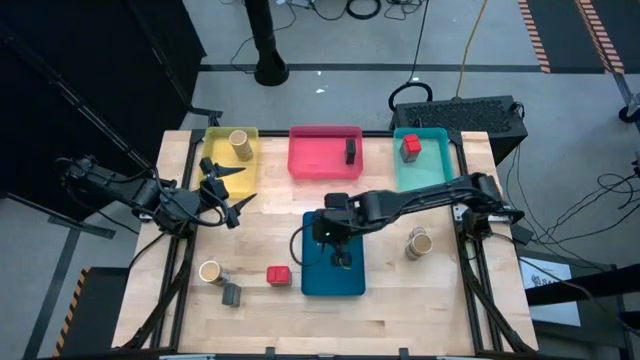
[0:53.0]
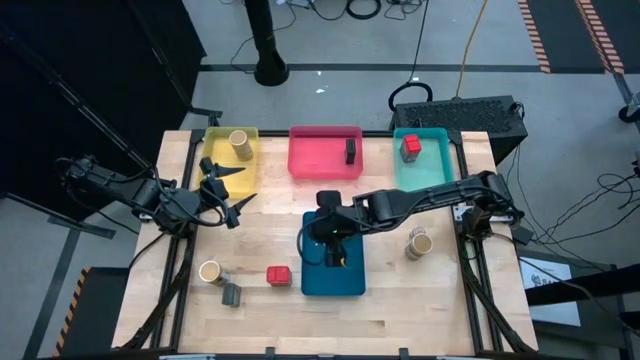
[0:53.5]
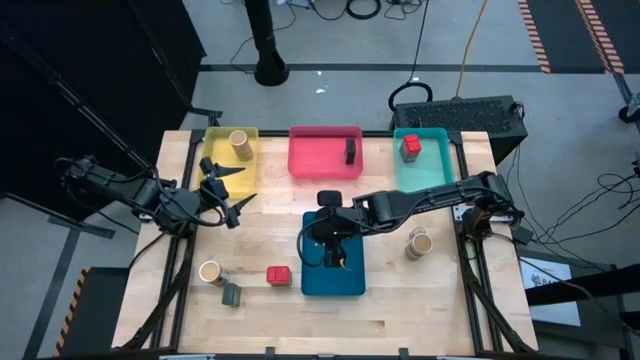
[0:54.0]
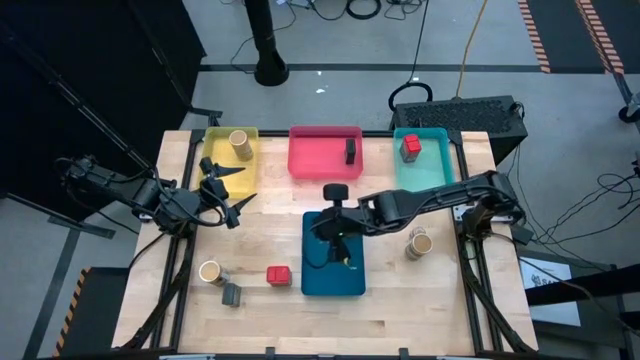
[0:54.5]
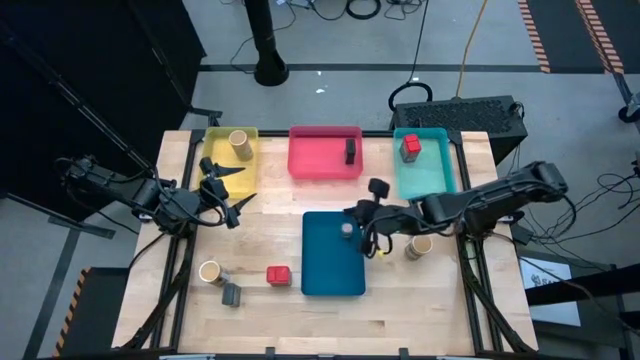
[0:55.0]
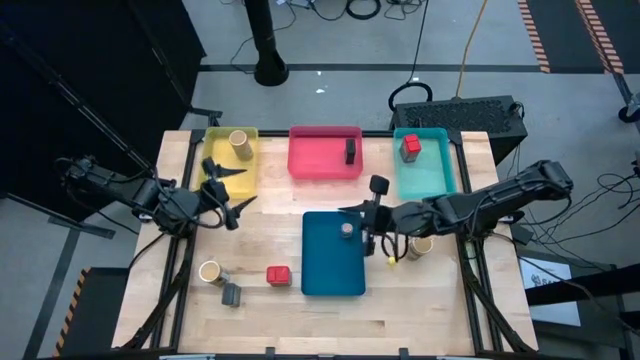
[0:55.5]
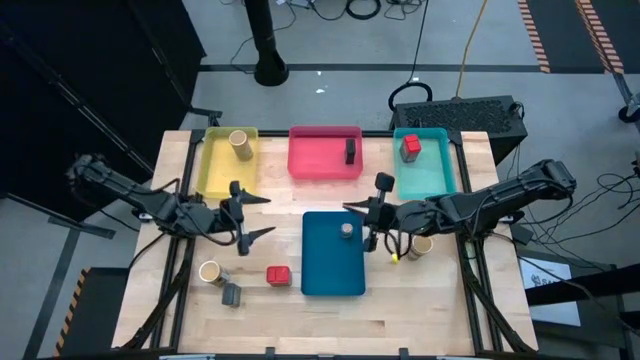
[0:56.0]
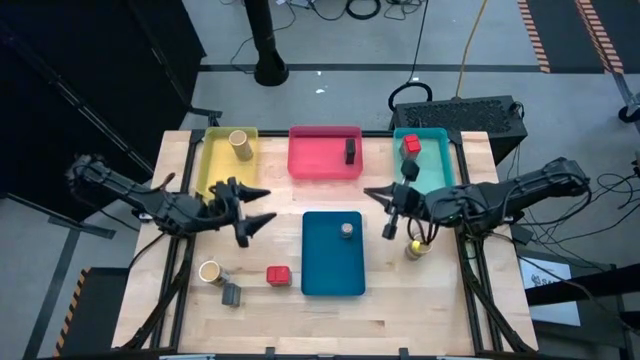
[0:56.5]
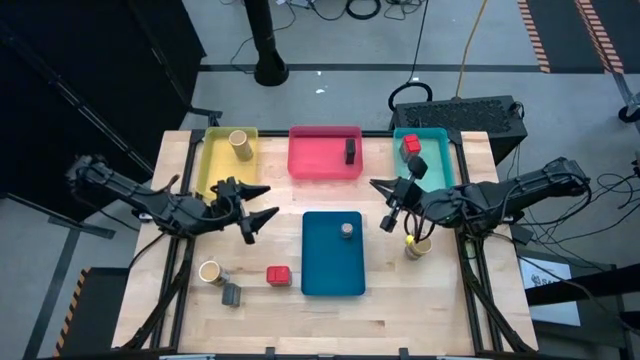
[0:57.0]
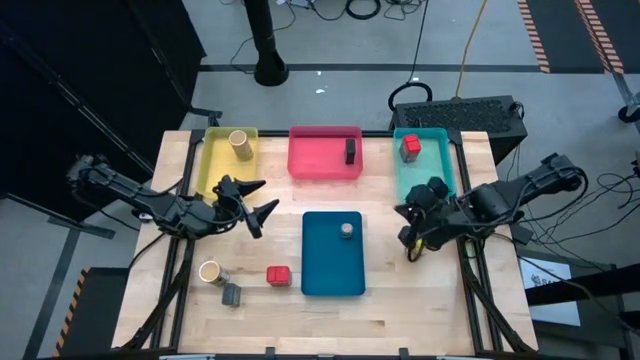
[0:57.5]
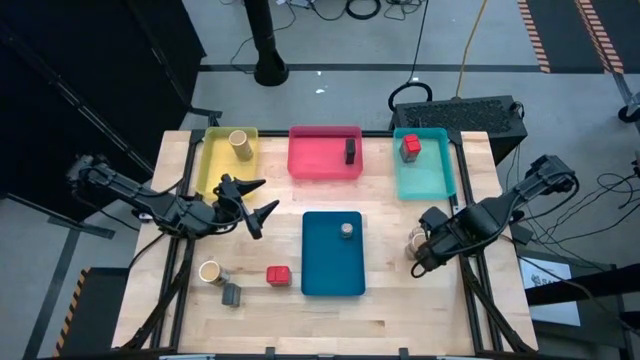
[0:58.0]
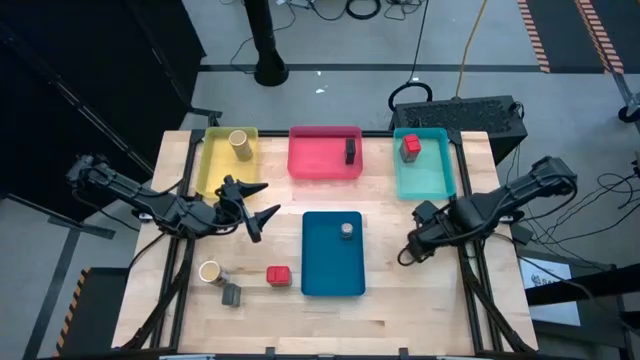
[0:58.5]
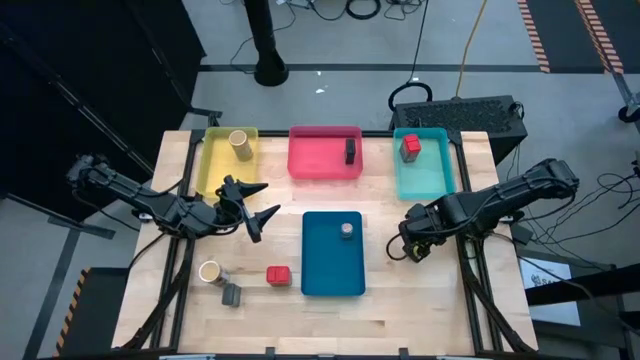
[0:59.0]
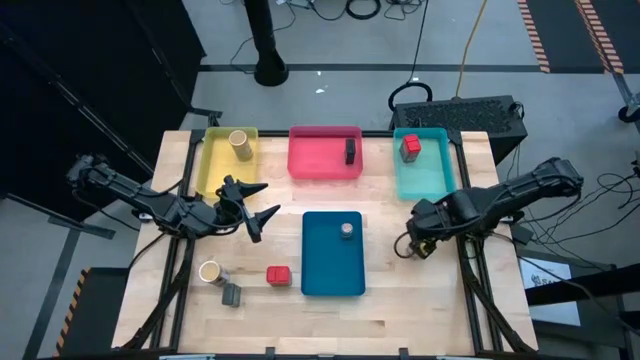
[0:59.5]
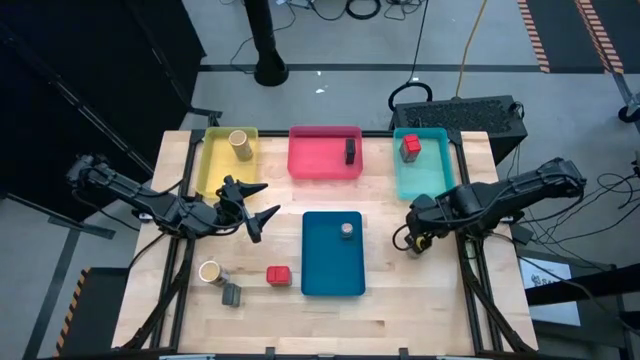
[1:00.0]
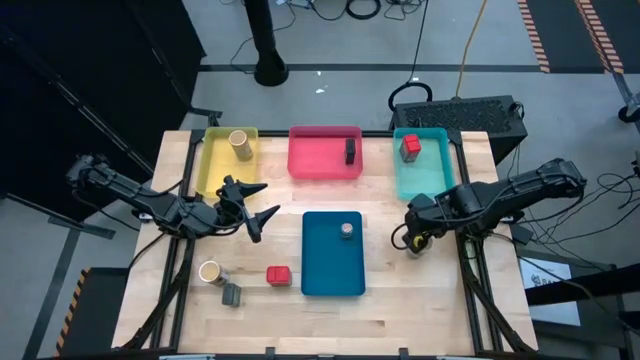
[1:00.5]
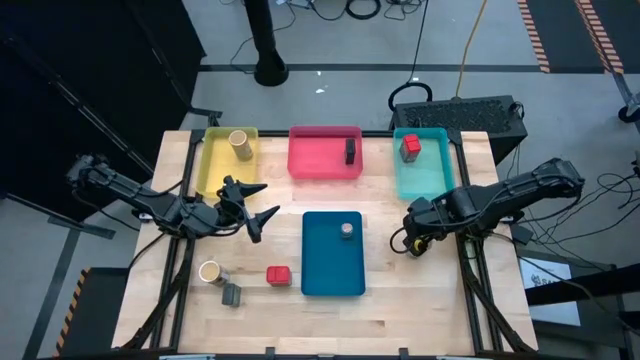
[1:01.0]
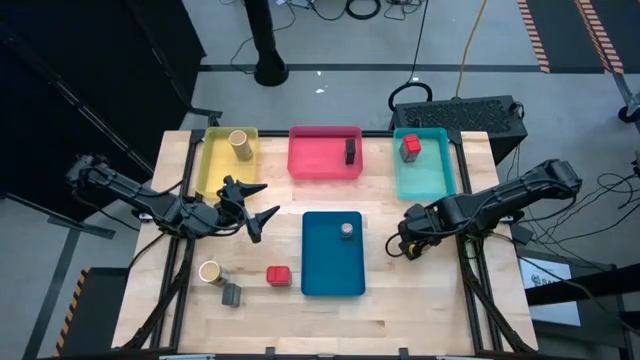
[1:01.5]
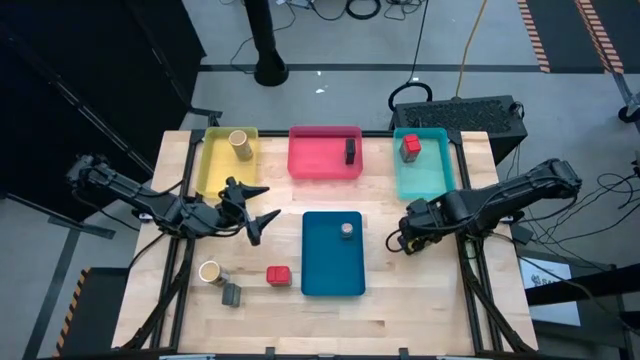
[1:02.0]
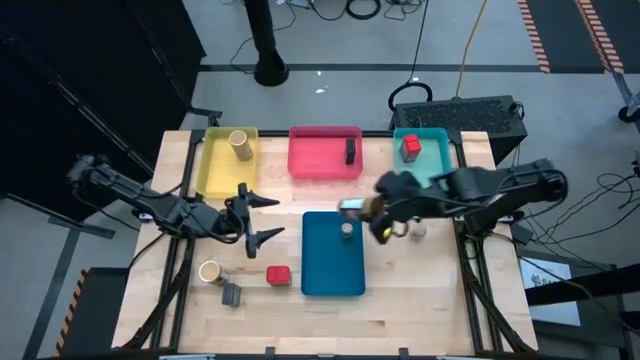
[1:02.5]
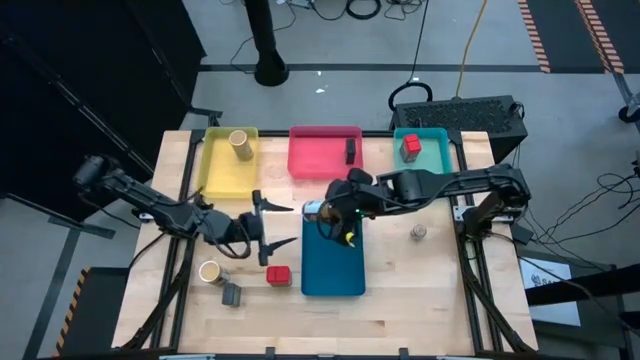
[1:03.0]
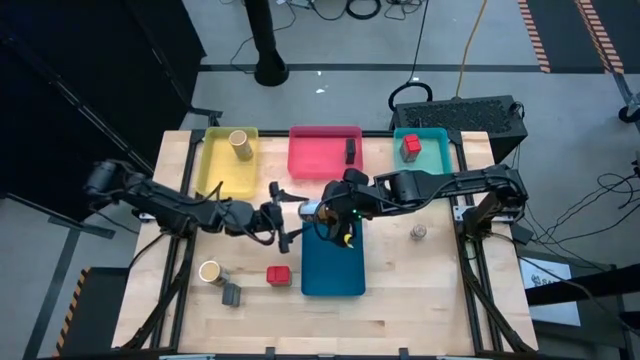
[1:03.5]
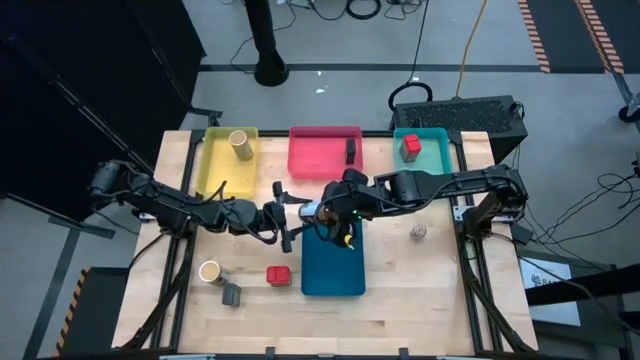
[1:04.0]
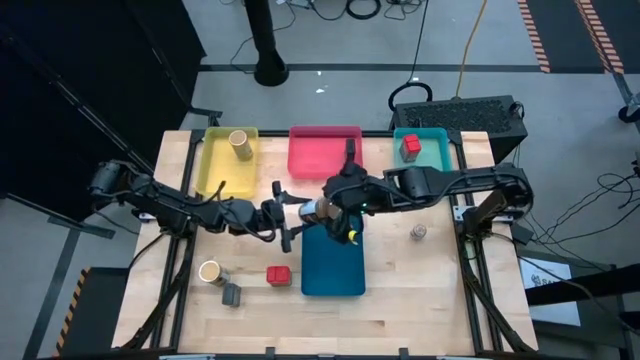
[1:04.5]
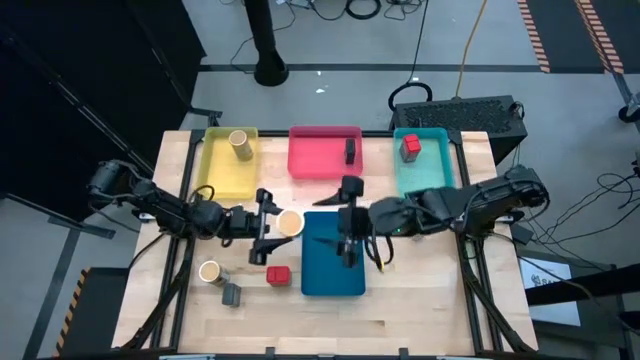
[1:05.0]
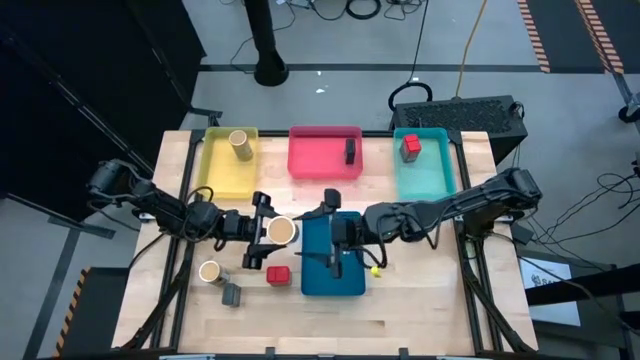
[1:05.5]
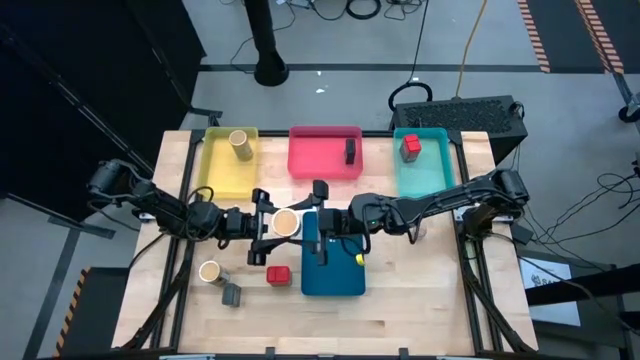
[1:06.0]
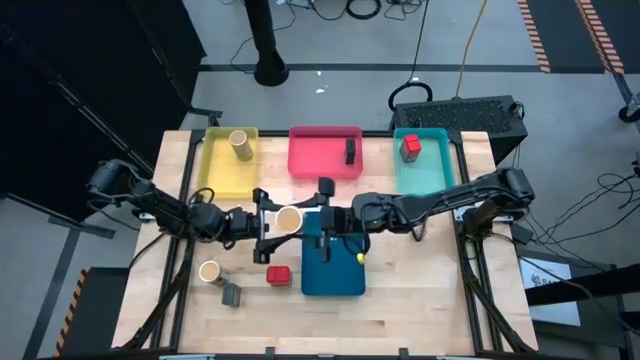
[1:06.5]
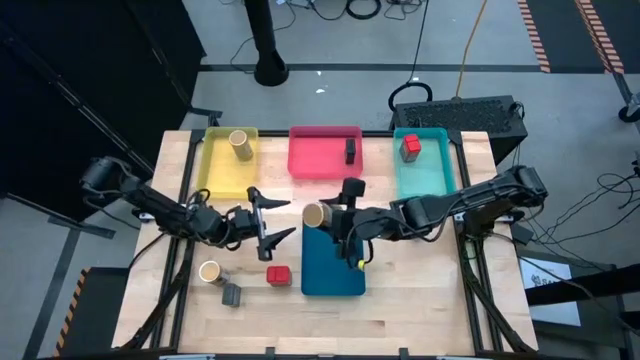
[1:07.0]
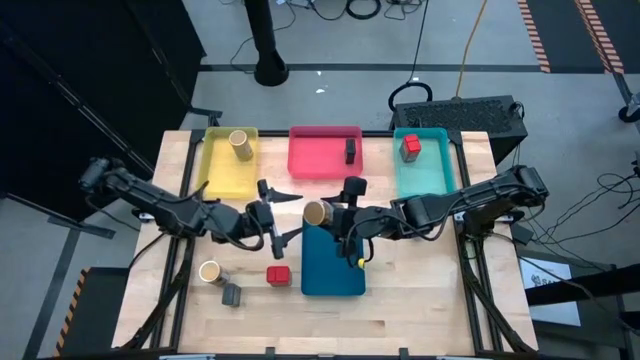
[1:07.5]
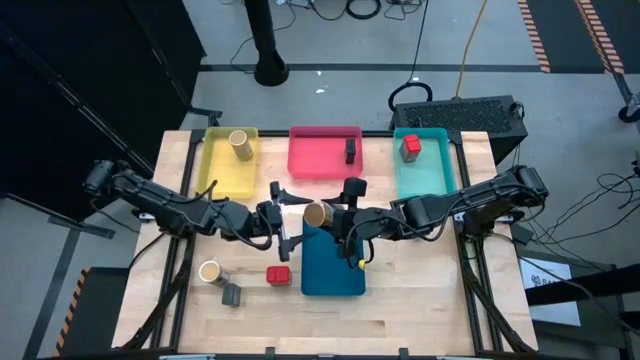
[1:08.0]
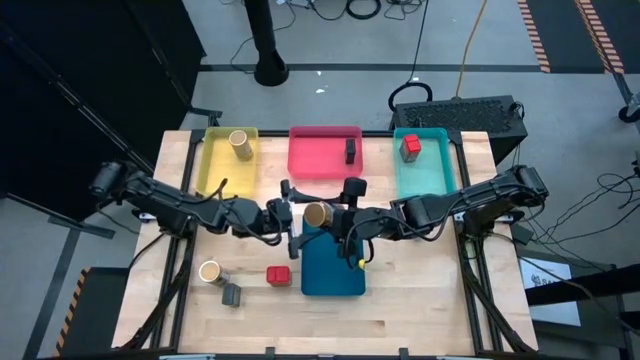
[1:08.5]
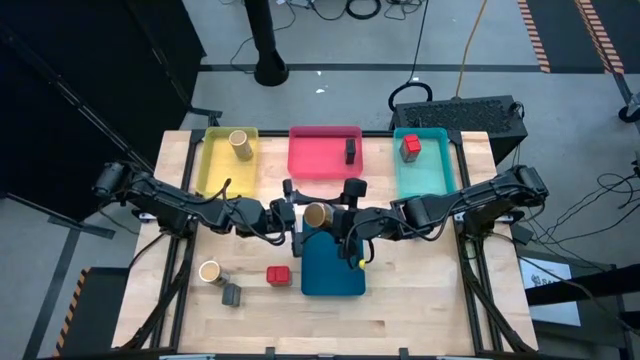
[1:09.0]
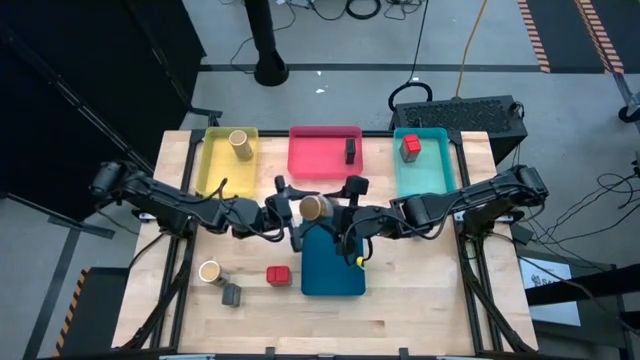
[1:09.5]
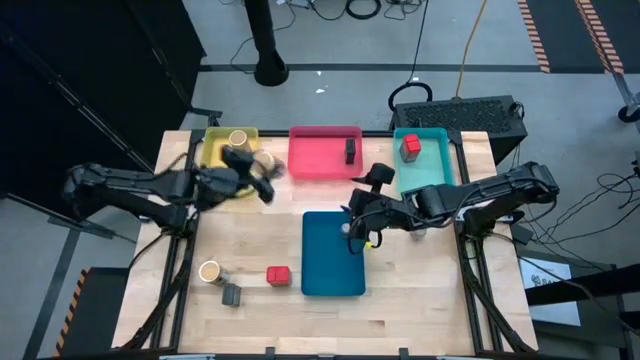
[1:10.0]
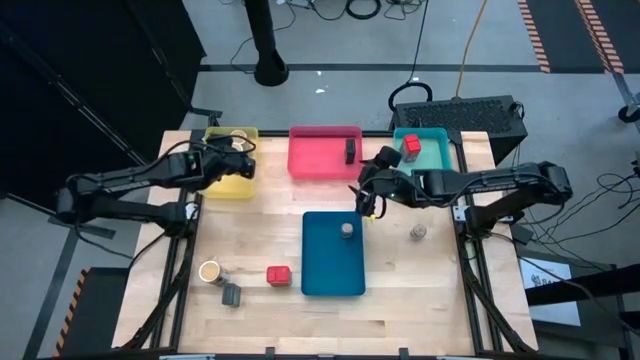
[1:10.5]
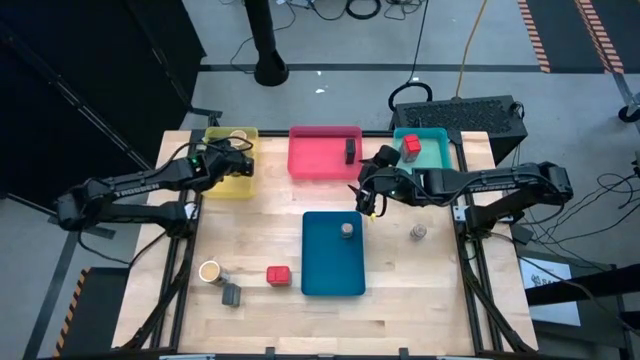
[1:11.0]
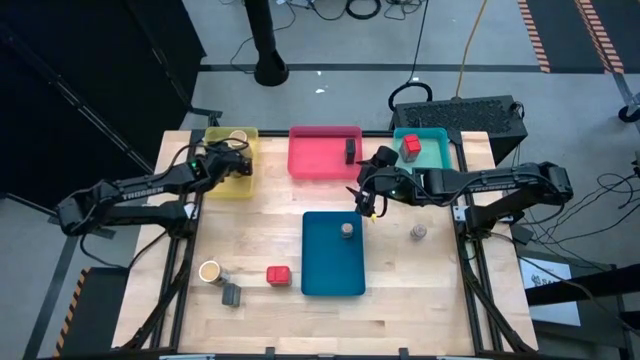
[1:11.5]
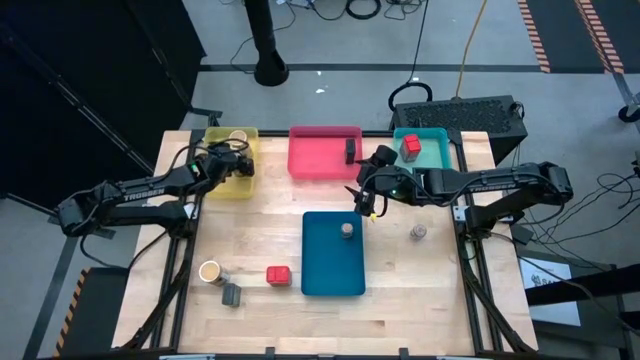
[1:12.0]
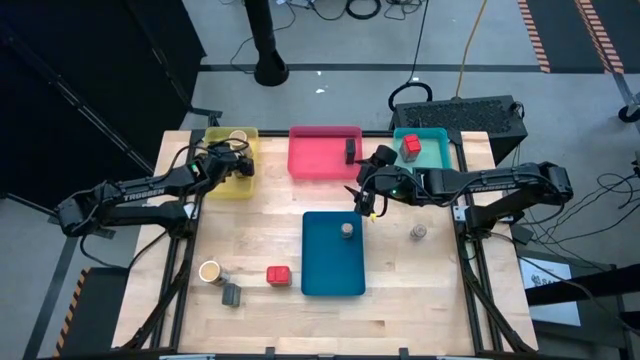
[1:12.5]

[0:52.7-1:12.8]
Task: Sort spices by type
Put the right gold seasoning bottle into the yellow bin
